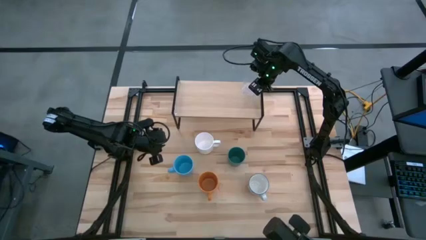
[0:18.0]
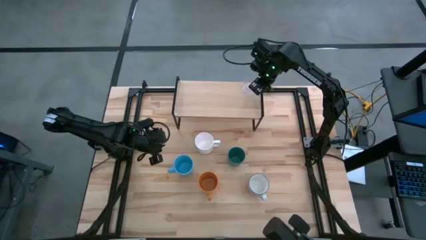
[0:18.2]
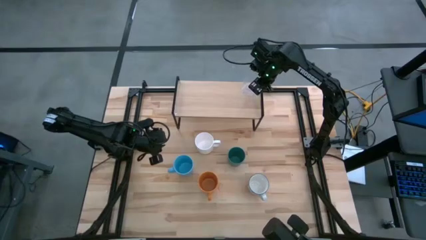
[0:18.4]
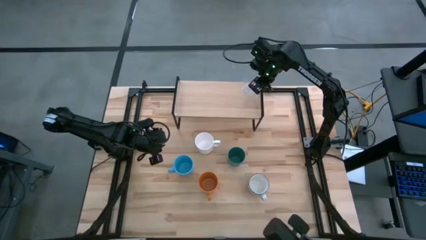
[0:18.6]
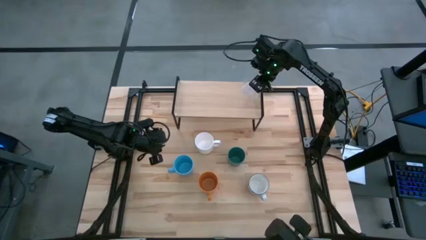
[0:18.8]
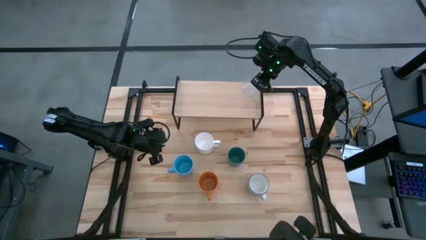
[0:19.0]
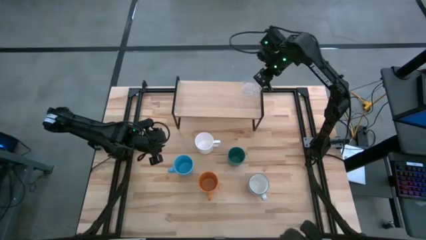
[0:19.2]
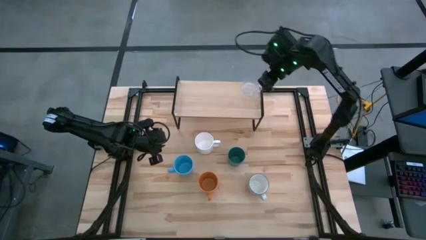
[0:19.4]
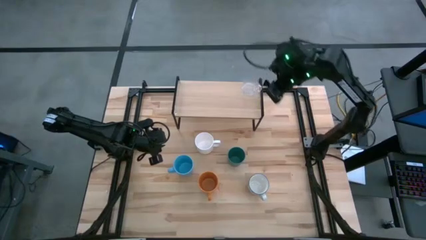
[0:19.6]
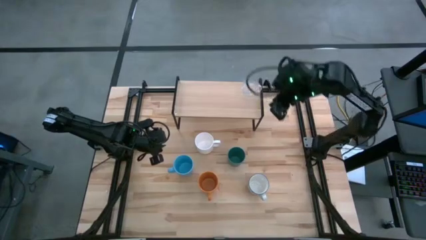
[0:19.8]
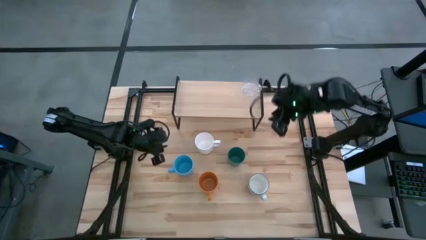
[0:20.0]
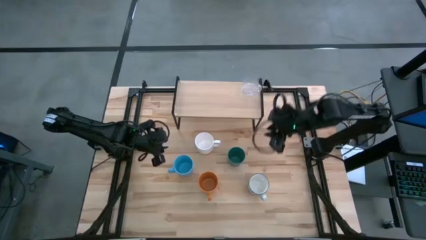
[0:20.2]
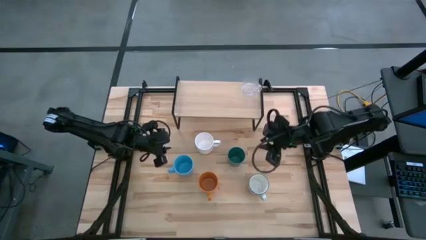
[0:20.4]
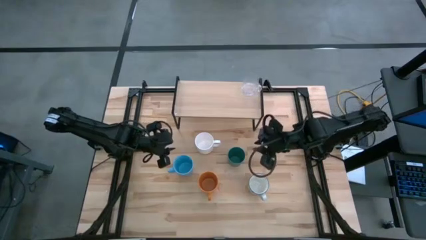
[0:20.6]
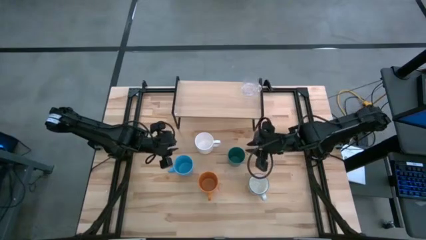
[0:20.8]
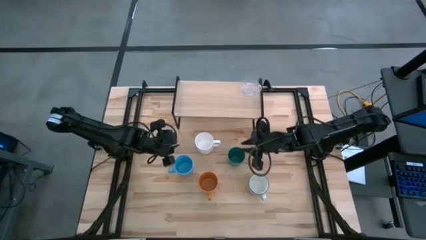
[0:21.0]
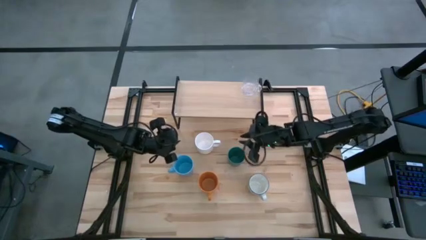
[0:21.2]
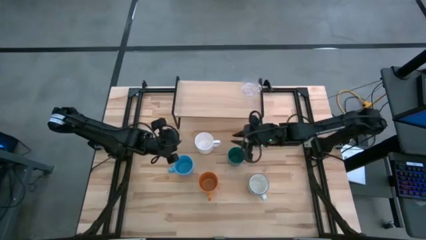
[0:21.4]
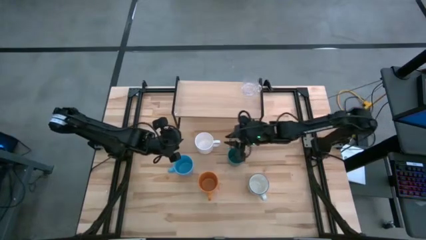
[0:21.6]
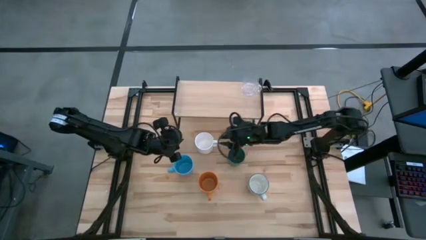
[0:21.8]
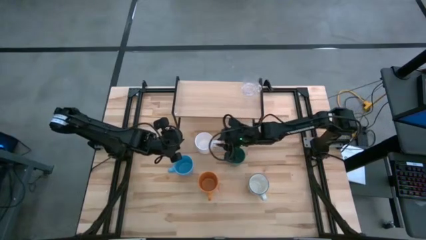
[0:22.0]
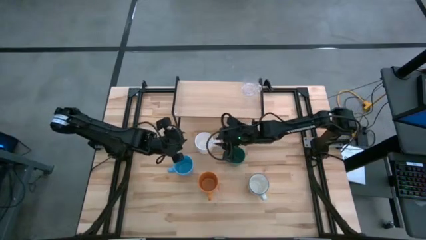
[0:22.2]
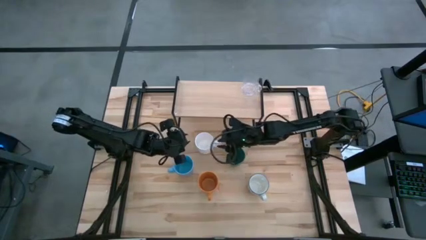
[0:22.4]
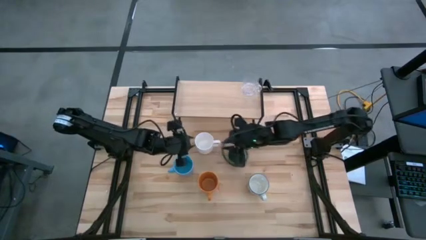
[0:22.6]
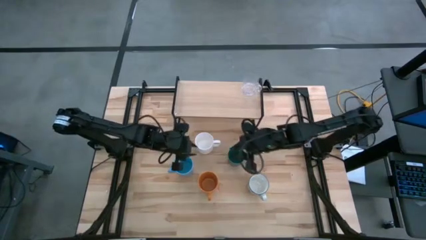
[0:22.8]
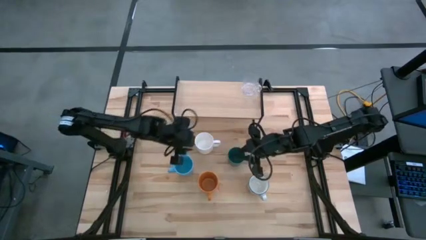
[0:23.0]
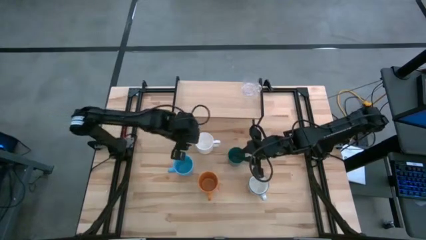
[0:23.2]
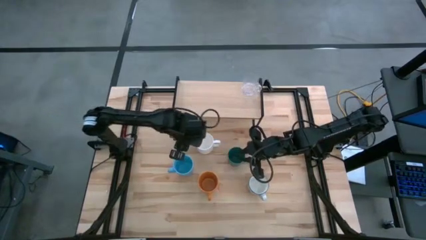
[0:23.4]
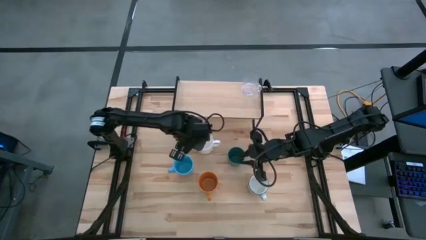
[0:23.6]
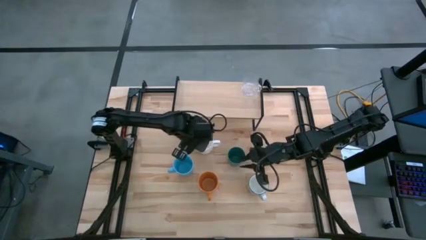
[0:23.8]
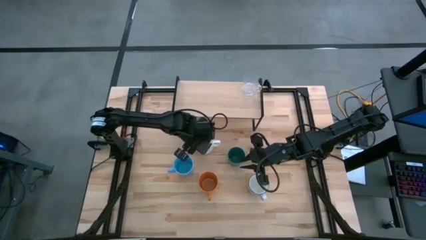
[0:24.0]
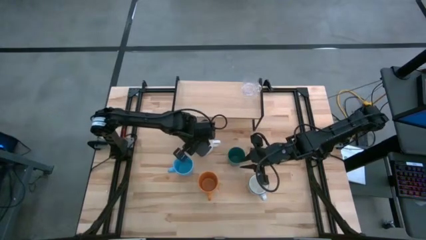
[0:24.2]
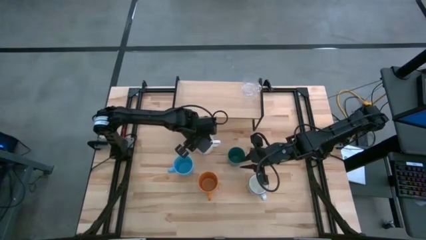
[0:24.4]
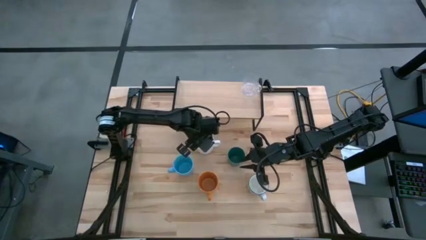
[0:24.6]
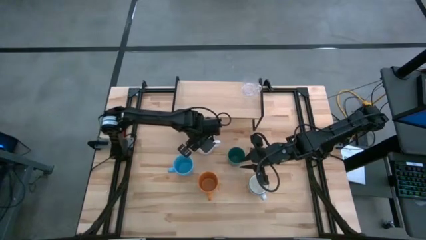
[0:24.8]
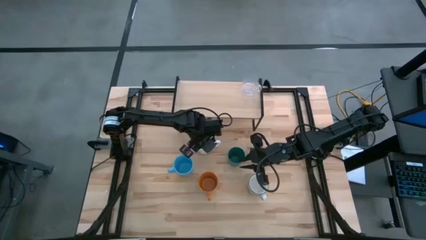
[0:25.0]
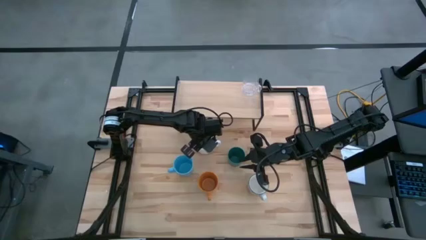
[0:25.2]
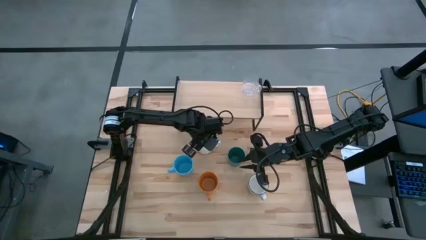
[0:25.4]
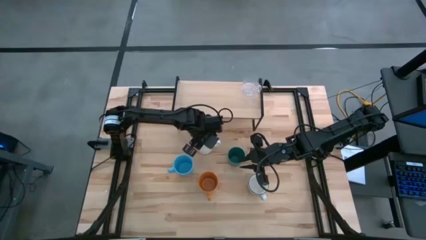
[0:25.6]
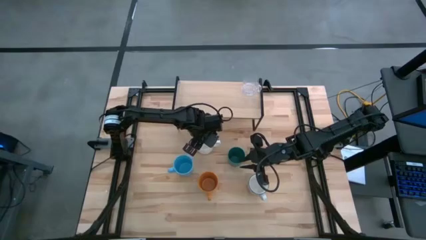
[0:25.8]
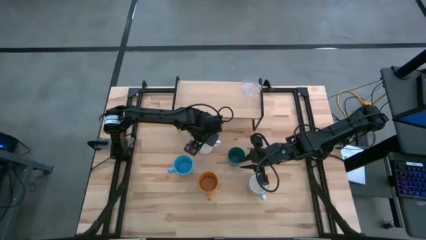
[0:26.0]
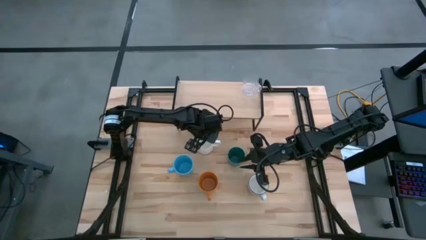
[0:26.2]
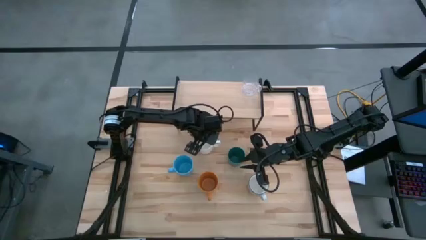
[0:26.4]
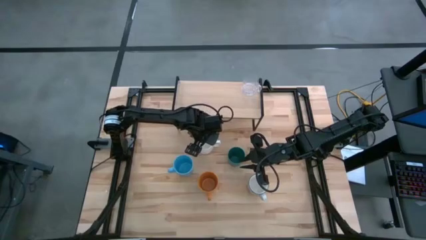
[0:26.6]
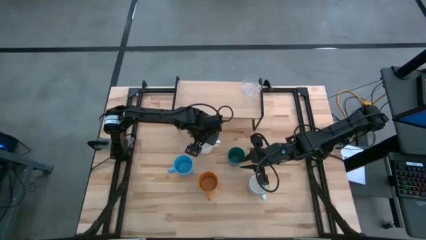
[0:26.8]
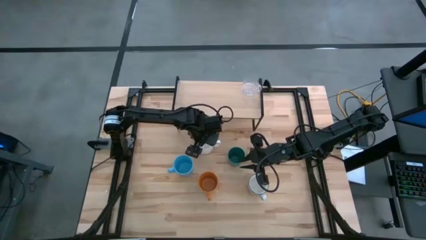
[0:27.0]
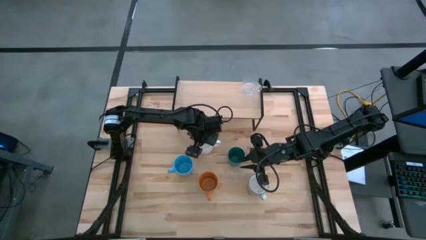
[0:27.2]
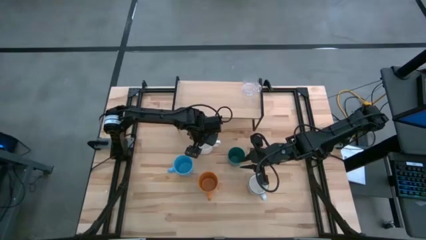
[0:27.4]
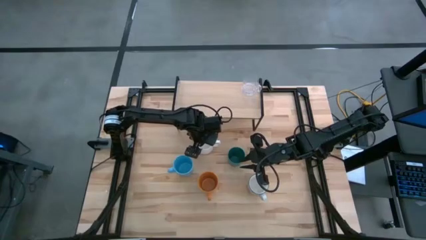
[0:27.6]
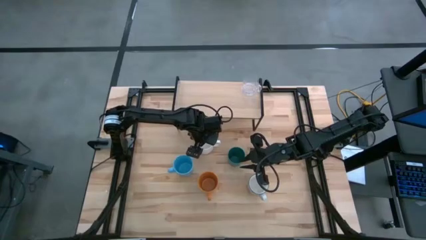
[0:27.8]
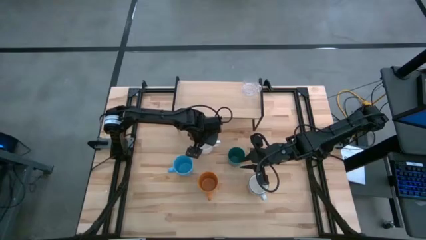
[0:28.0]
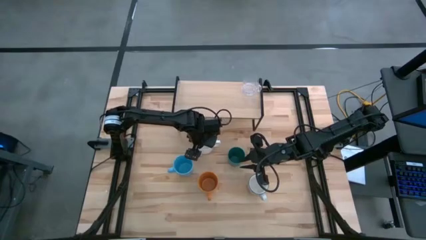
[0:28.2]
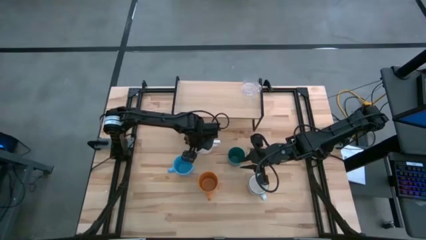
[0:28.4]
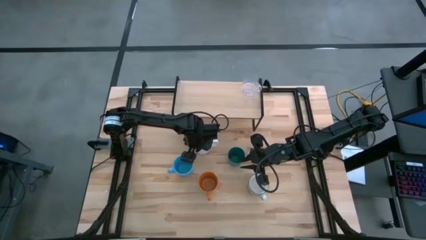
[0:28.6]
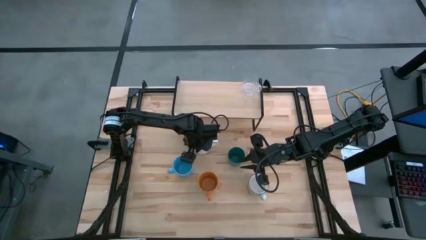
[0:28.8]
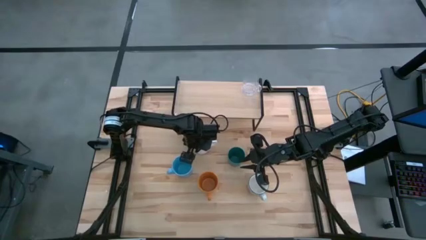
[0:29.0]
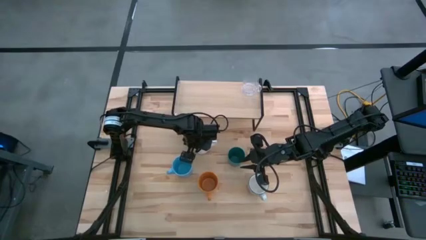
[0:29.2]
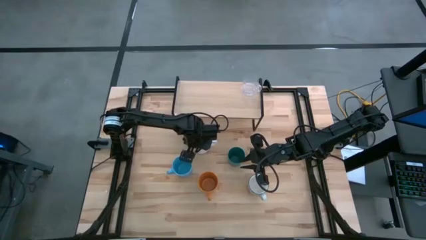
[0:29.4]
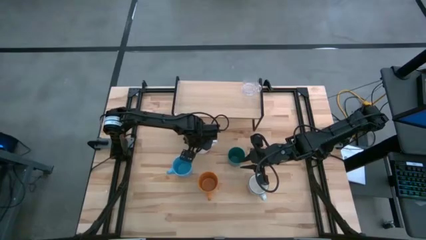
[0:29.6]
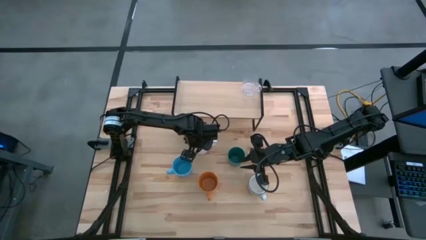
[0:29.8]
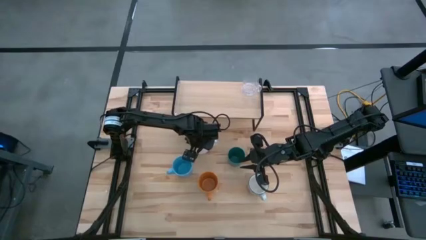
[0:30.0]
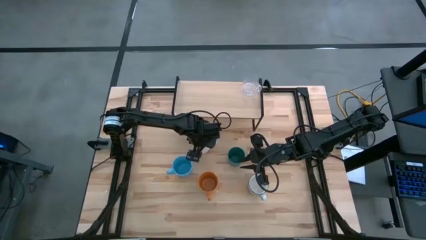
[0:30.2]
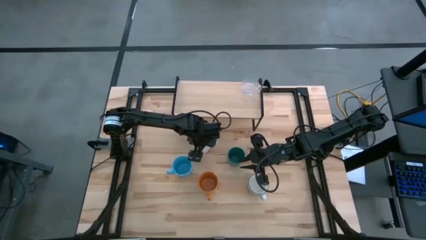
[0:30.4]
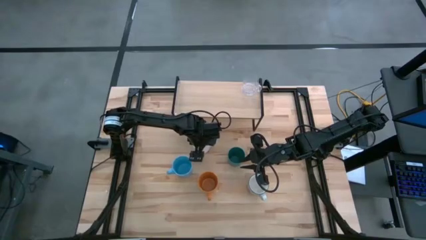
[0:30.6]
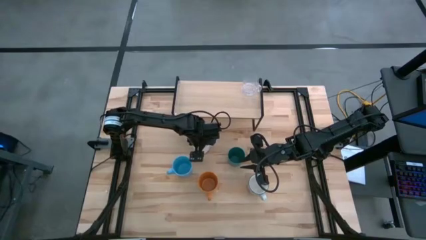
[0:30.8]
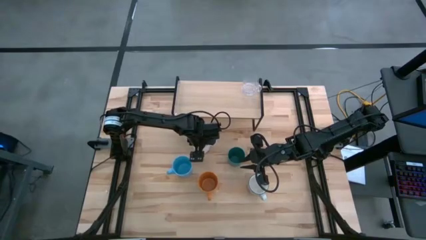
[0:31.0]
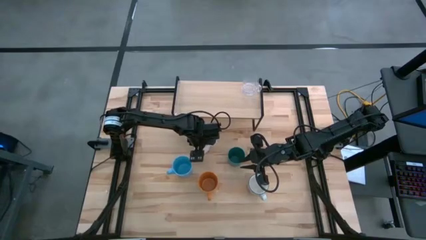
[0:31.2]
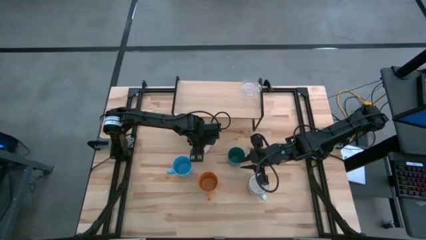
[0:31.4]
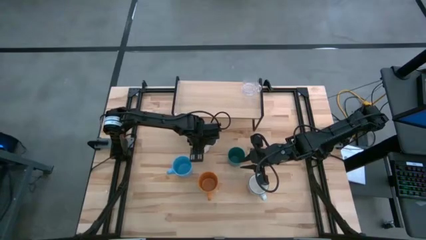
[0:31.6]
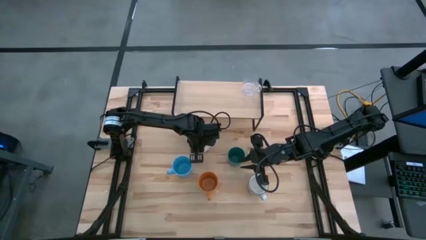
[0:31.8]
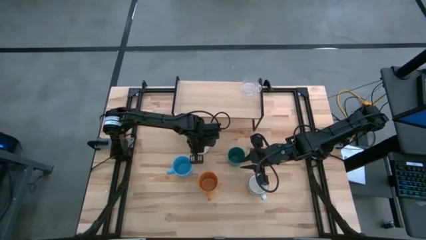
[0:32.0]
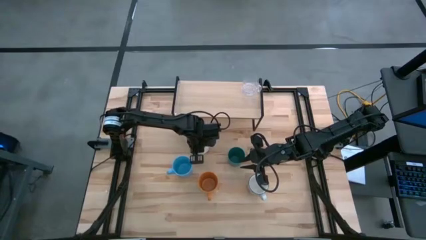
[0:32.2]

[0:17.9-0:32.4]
Task: Stack small to large cups/mugs on shelf
Put the white cup on the shelf

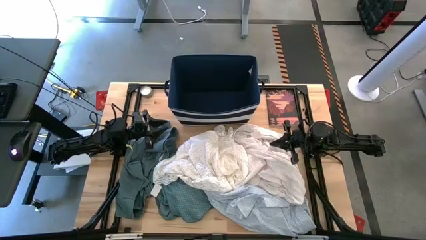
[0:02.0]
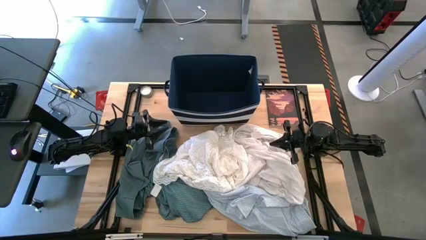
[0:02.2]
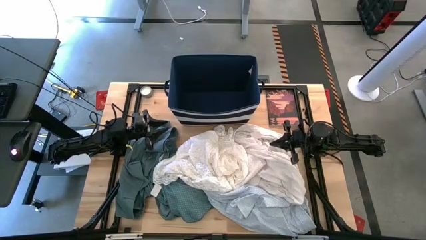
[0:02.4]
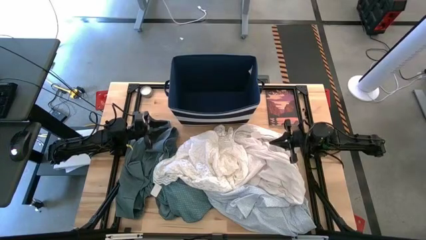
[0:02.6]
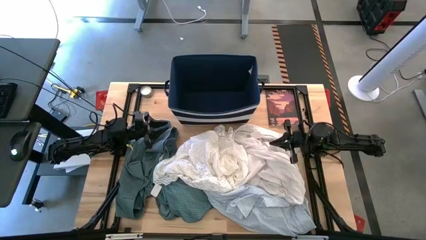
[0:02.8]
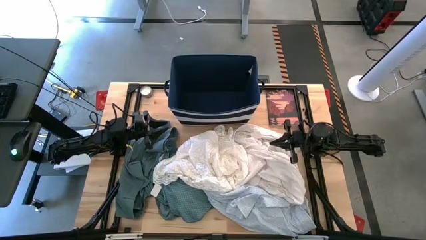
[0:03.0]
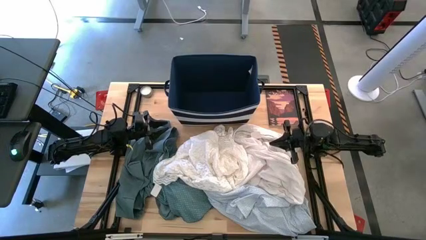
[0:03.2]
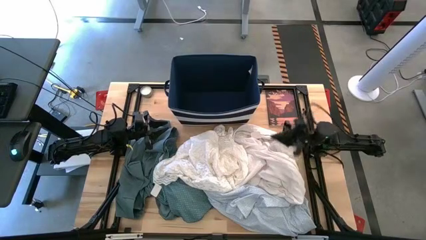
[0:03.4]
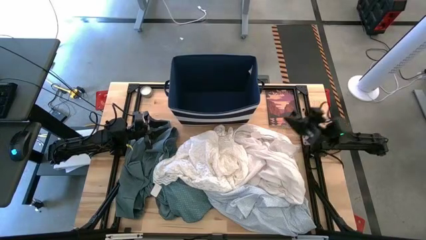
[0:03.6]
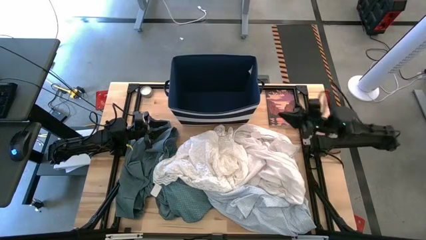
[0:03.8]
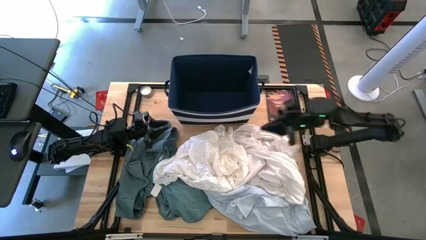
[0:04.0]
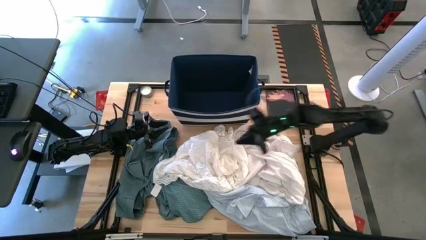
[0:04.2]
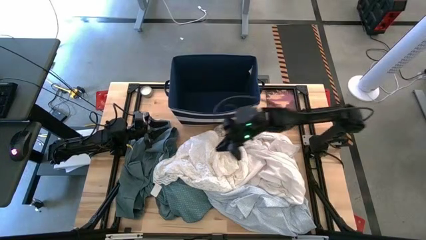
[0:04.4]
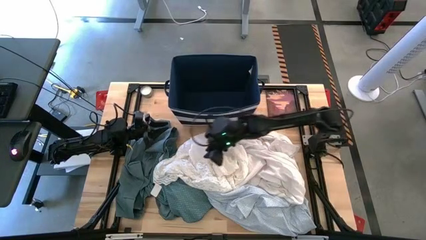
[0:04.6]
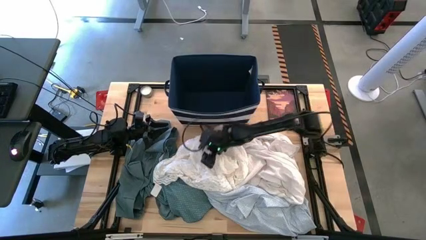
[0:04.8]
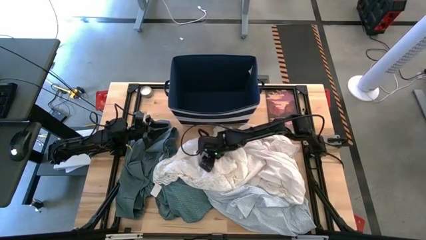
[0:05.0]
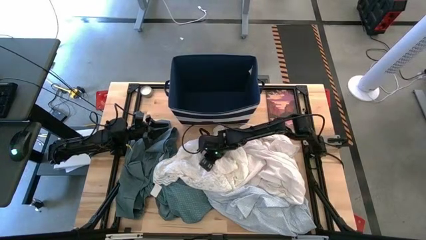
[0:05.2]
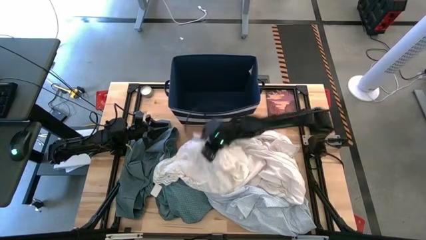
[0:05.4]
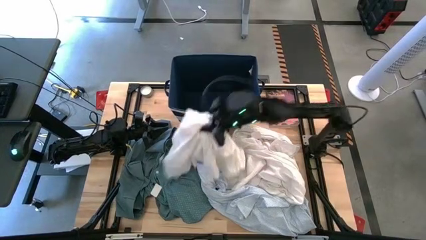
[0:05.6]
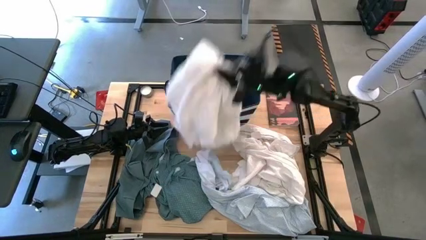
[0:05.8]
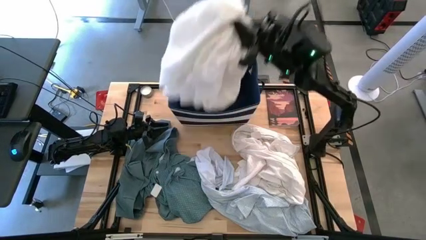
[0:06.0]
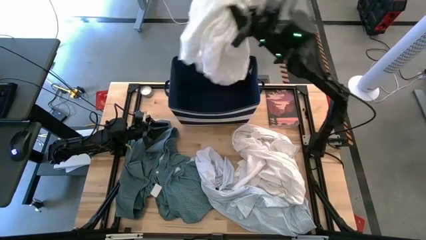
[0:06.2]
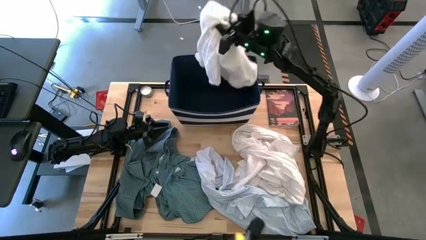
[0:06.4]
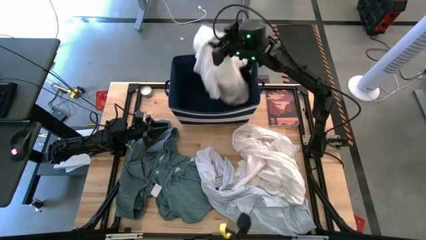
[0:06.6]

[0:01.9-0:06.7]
Task: Sort clothes
Put the white dress into the blue bin
